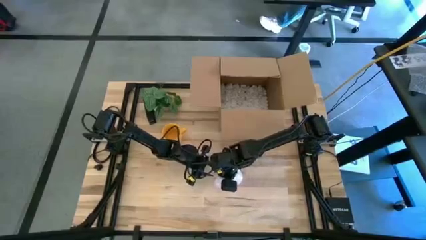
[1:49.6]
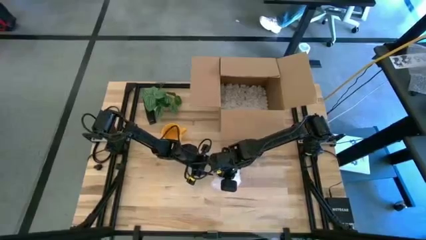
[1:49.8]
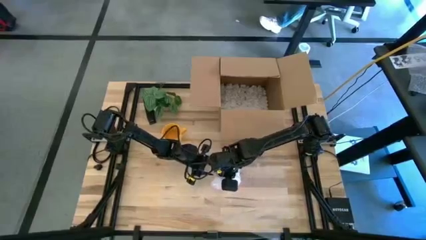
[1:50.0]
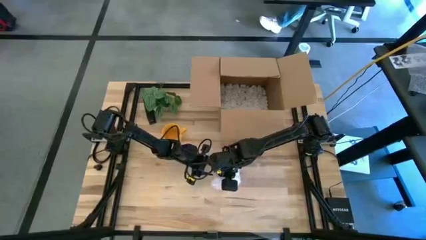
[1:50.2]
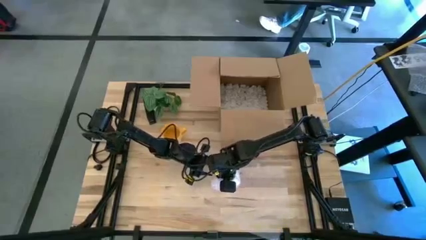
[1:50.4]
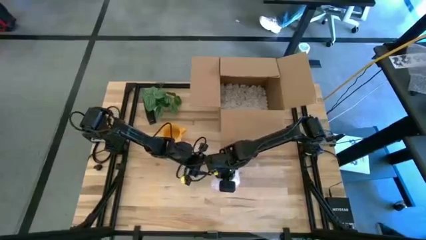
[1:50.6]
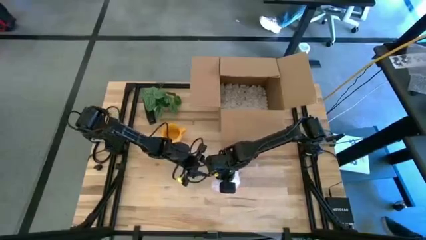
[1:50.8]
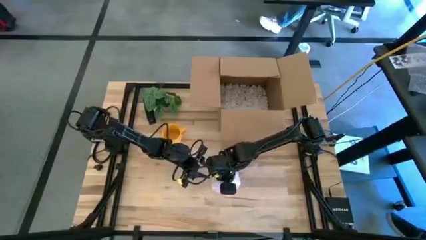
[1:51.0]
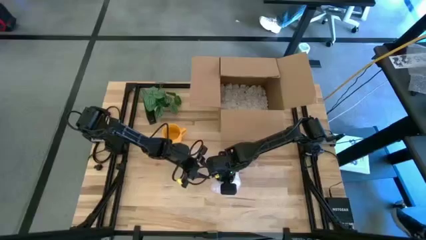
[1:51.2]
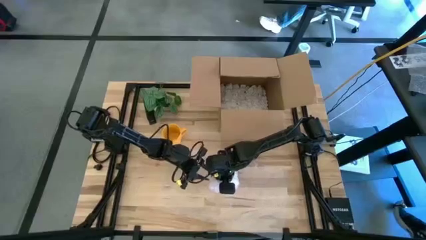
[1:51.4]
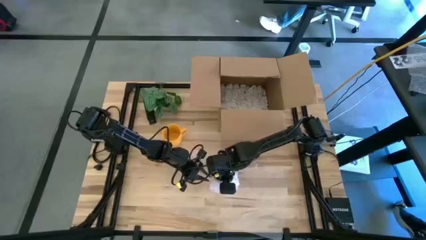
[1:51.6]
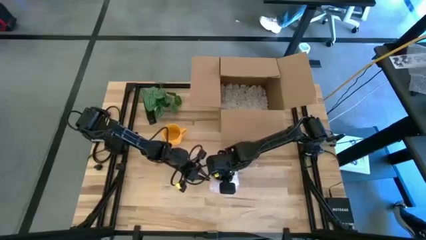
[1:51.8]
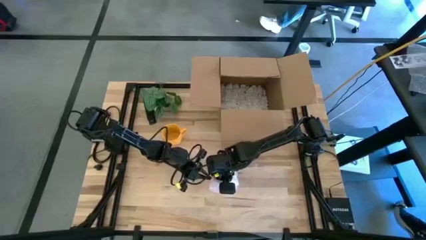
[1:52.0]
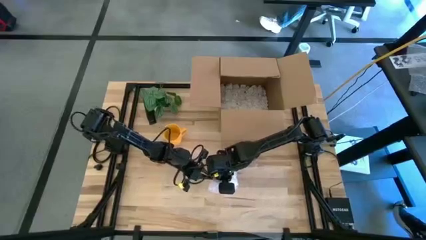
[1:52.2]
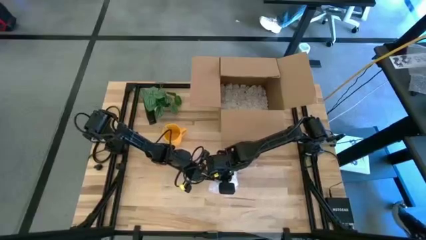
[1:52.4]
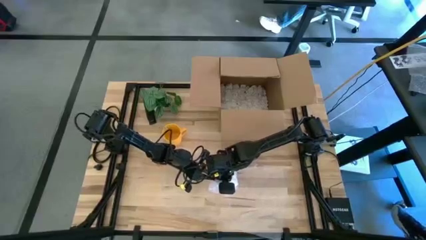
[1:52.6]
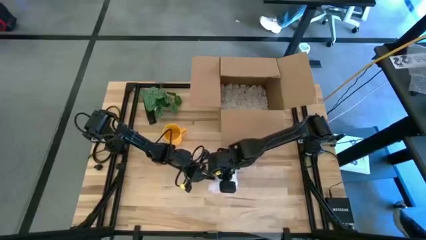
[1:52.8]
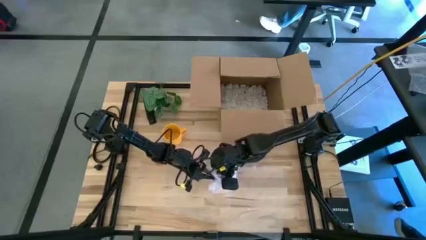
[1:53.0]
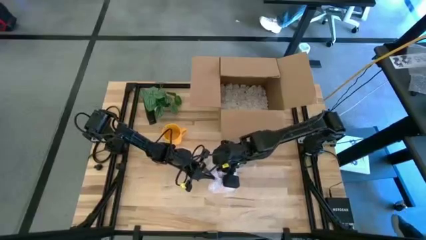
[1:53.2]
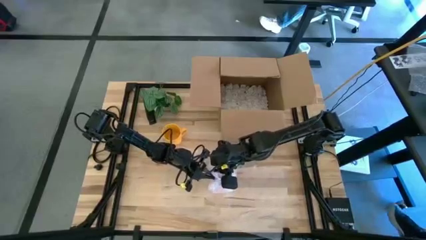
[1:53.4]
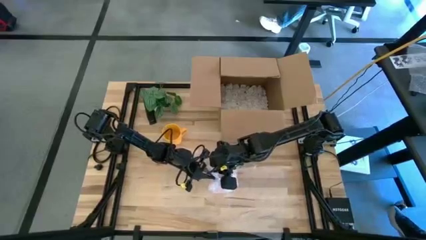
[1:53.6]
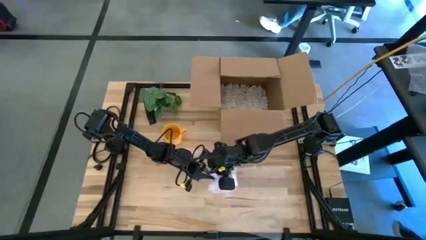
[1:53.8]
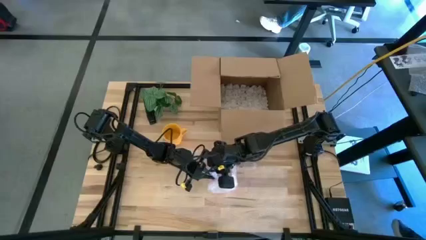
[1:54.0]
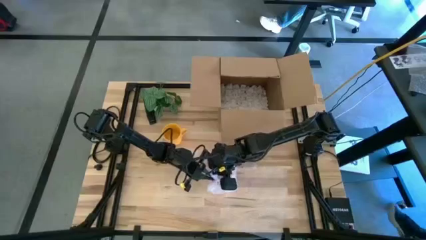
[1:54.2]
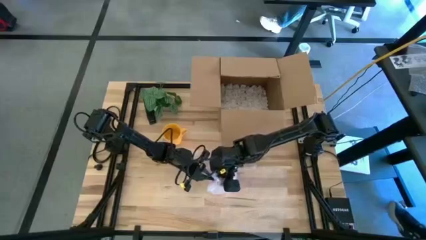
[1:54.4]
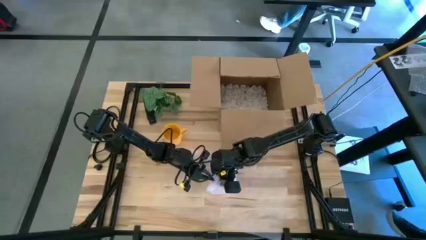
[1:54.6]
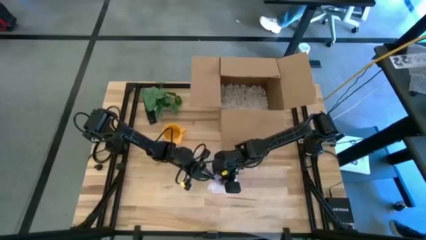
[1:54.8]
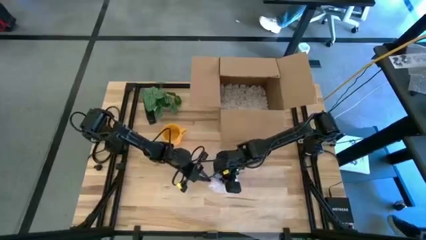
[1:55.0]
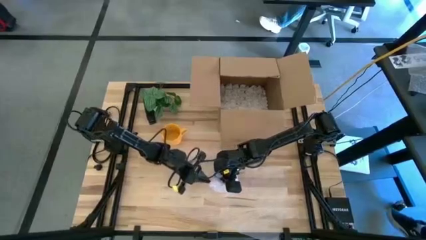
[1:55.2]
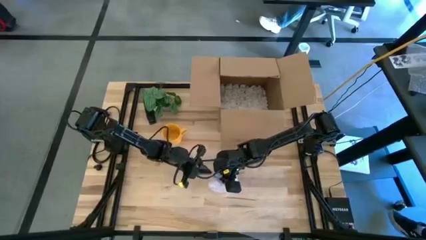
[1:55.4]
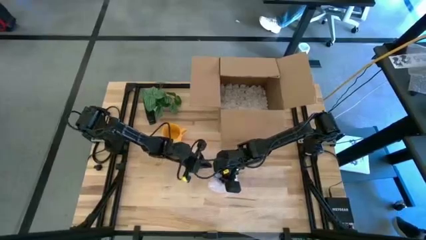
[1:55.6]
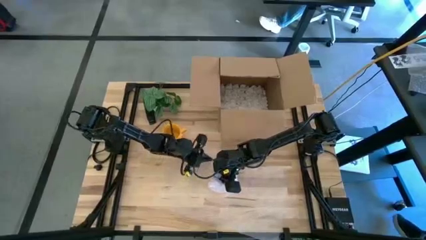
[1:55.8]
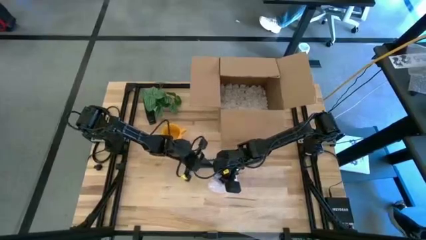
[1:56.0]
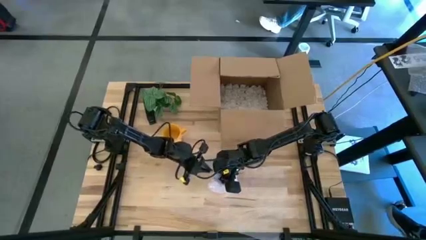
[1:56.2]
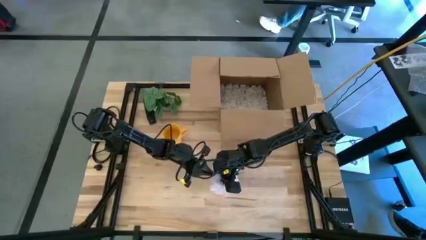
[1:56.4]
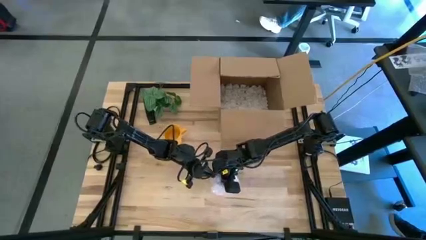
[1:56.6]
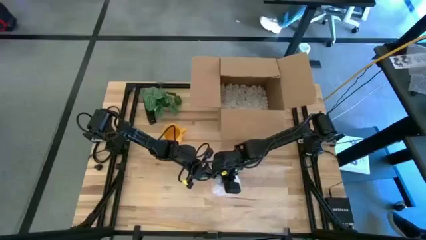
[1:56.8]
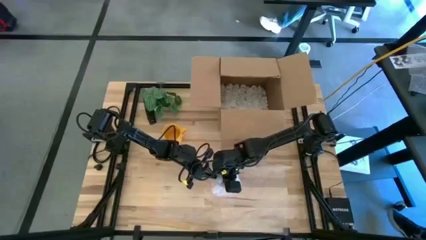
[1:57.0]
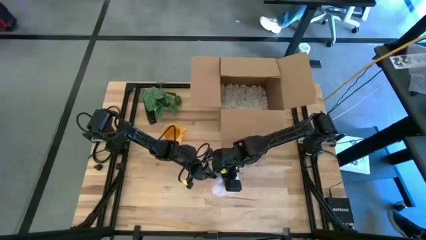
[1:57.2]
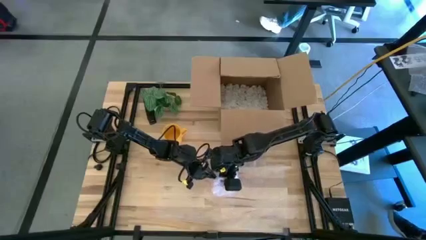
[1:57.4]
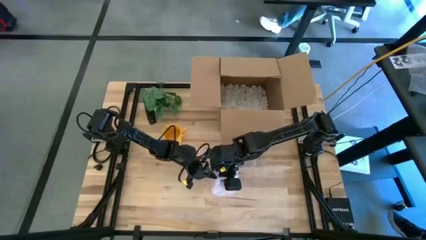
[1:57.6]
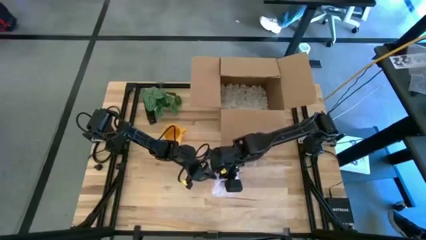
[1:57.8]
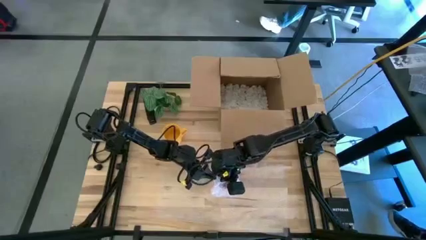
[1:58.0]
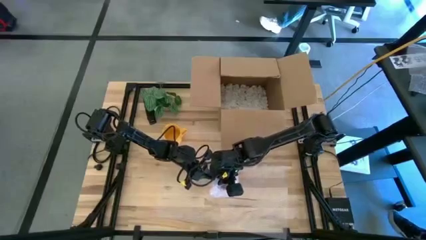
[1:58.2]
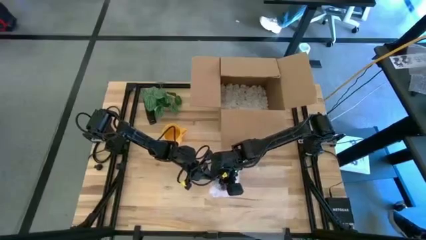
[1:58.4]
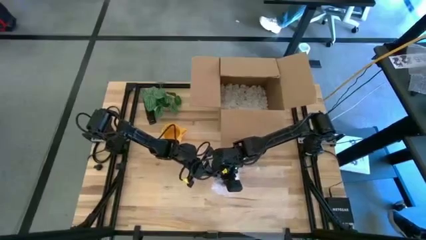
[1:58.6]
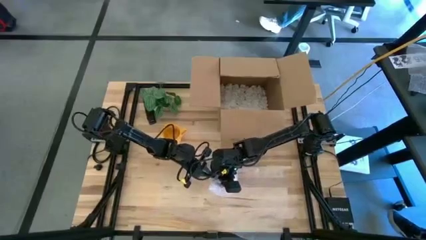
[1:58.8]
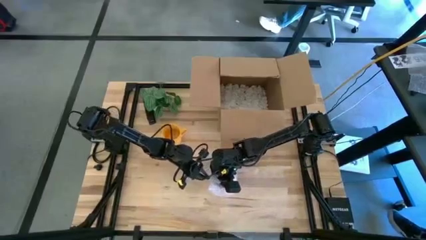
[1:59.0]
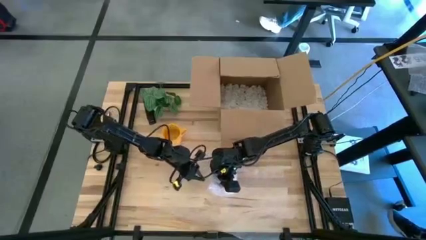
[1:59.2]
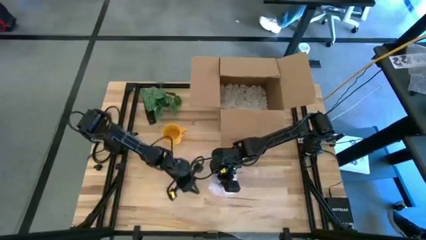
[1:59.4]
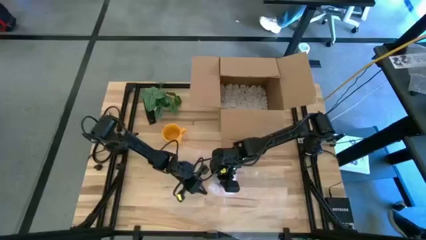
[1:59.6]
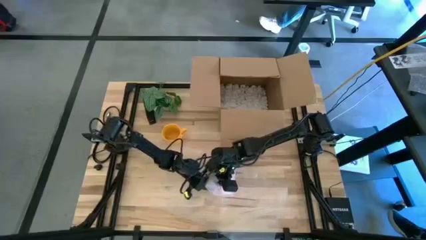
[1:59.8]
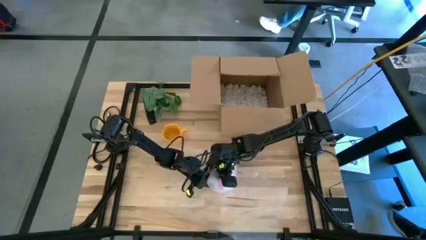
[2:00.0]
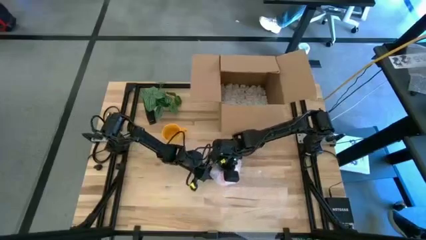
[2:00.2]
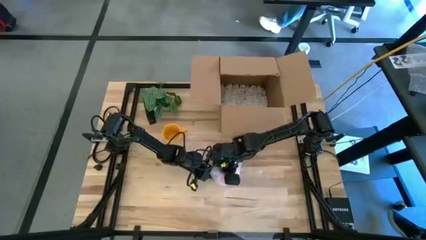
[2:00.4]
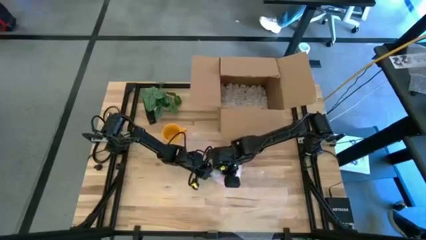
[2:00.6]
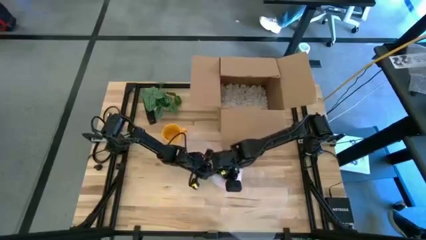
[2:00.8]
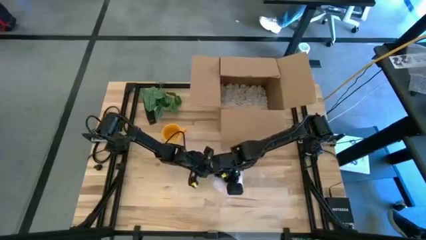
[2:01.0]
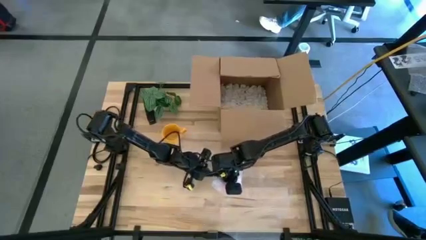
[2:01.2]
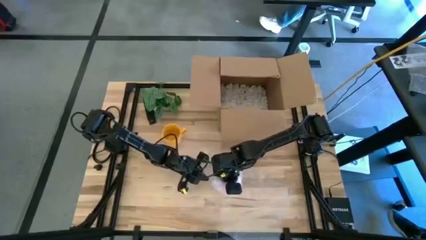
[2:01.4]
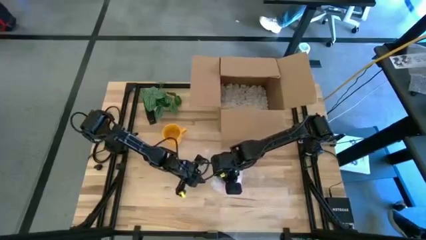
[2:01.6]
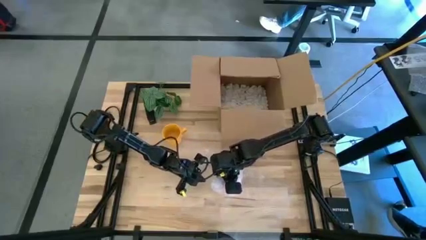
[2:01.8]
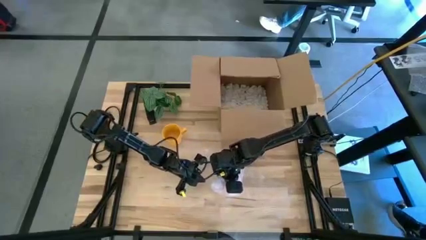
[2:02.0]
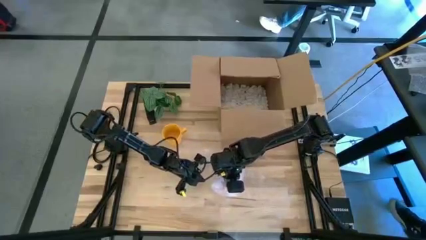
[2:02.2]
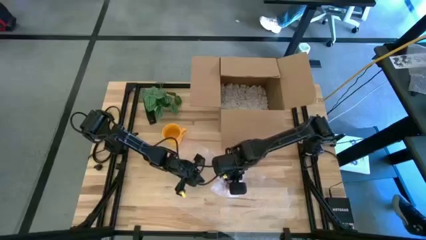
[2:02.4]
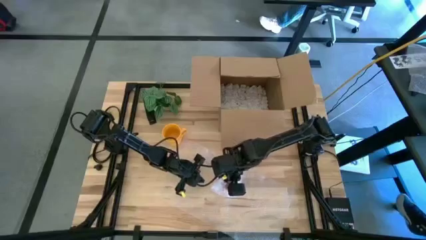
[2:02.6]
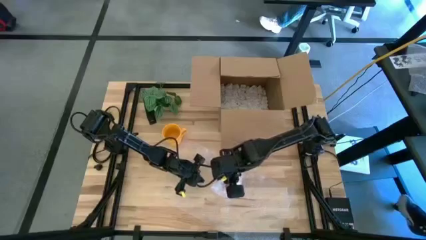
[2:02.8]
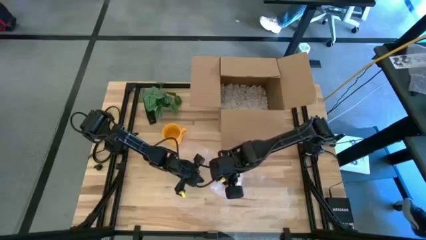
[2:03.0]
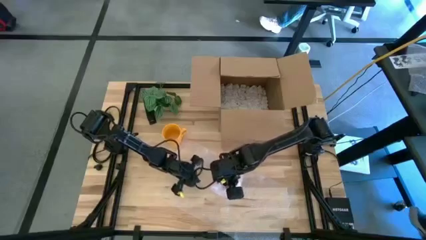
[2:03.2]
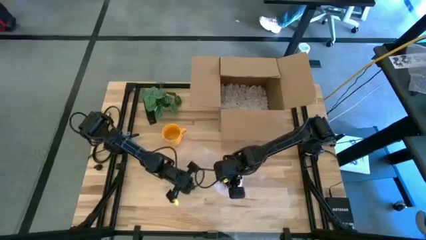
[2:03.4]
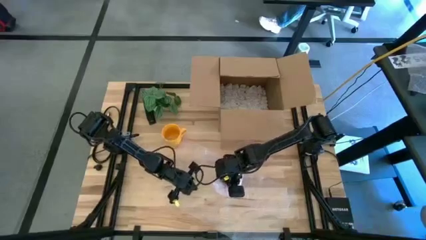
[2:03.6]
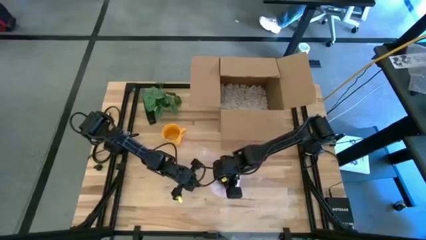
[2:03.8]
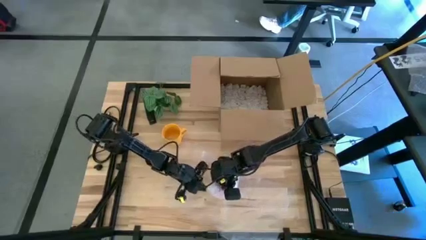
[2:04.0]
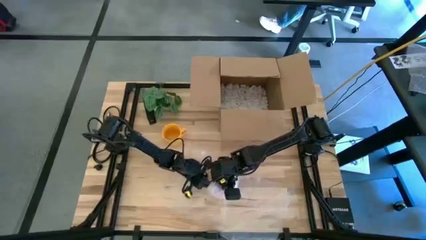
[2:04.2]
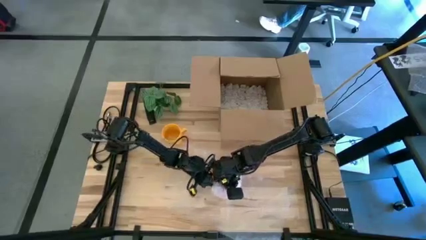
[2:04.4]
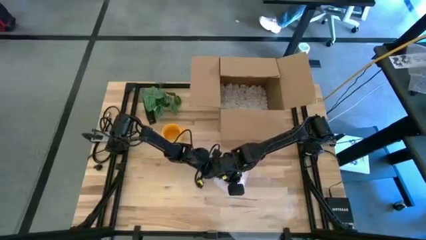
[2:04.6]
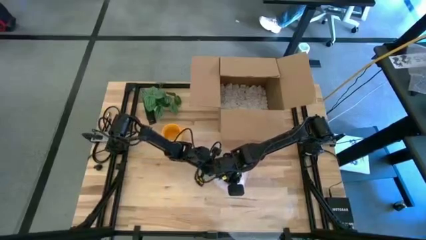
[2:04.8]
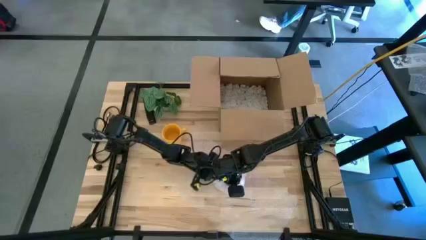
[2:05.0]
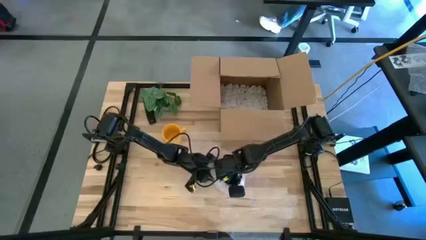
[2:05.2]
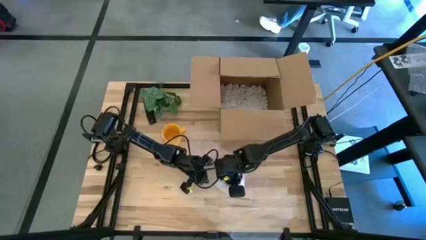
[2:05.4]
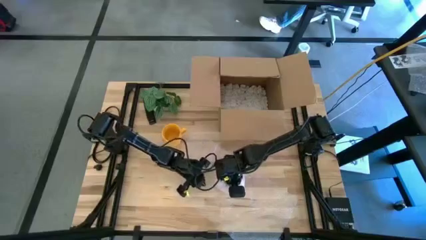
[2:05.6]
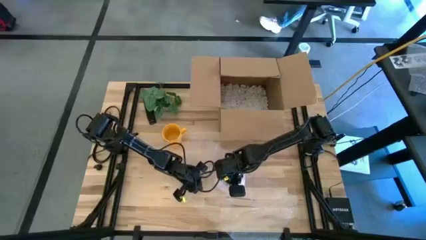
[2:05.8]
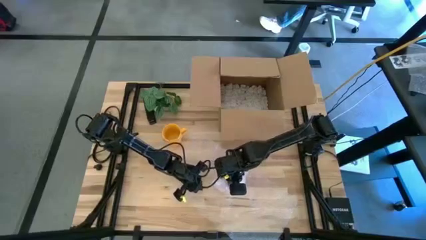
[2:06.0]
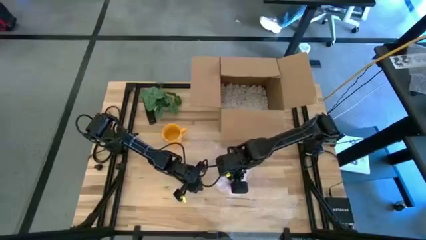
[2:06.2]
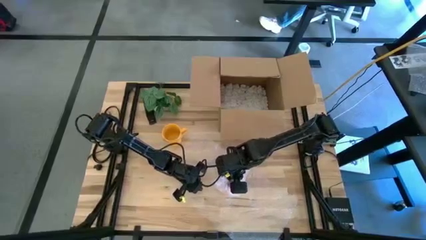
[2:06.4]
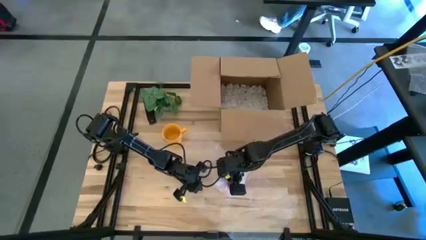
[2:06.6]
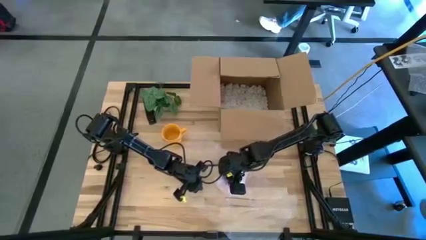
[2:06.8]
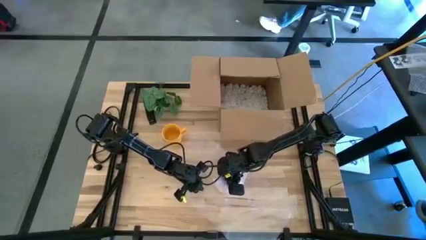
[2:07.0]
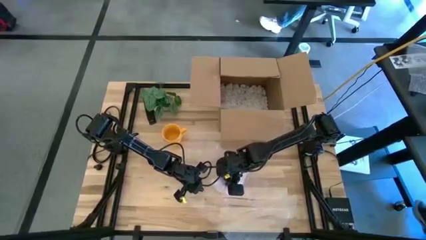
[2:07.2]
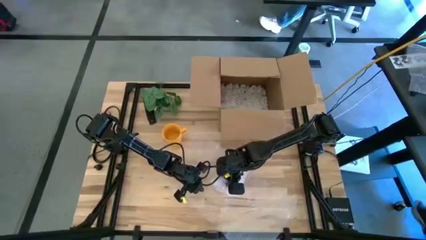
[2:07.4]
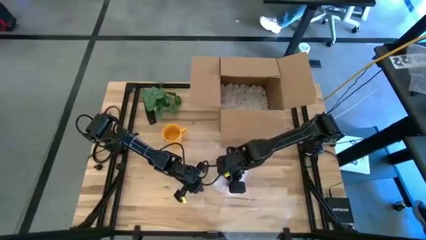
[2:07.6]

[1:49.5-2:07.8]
Task: wrap mug
Wrap the orange mug with the bubble wrap
